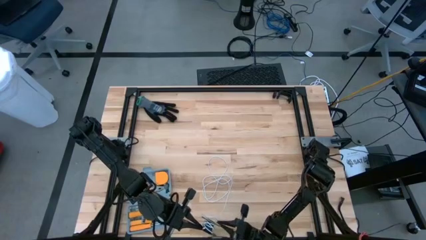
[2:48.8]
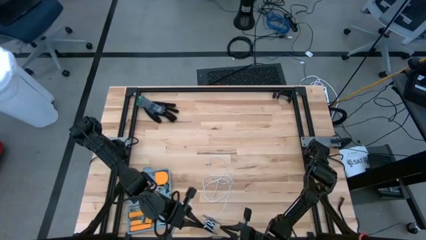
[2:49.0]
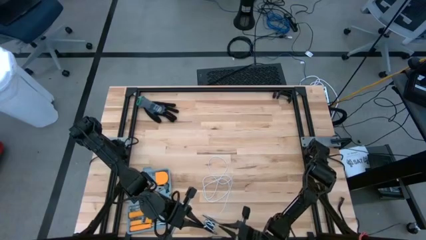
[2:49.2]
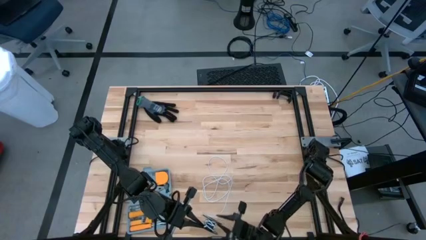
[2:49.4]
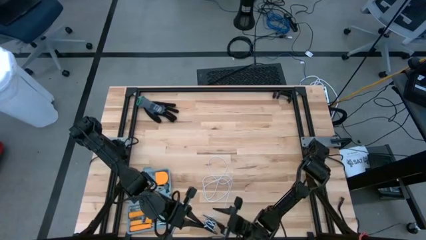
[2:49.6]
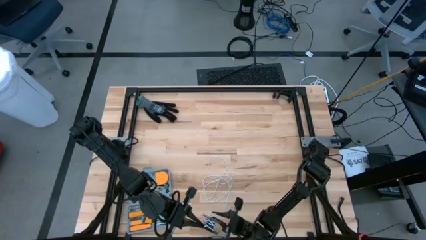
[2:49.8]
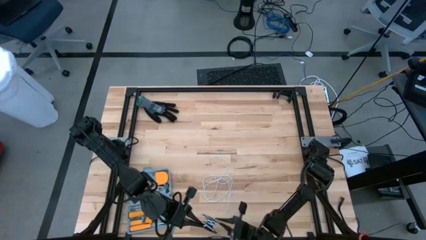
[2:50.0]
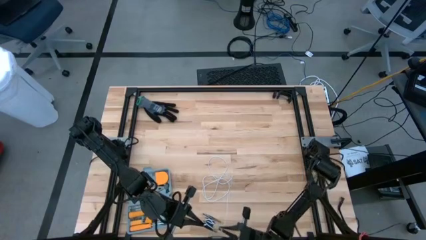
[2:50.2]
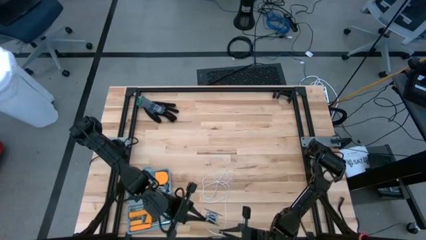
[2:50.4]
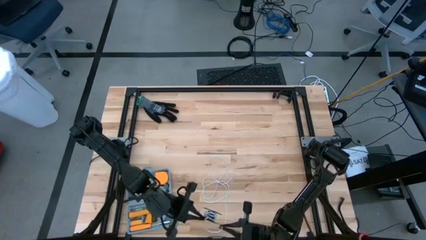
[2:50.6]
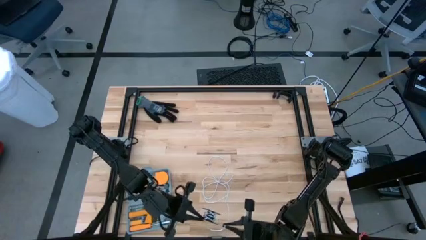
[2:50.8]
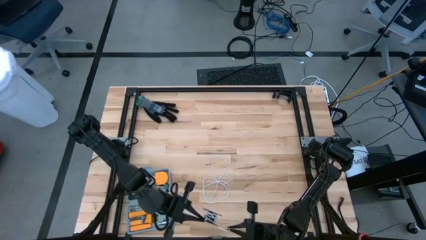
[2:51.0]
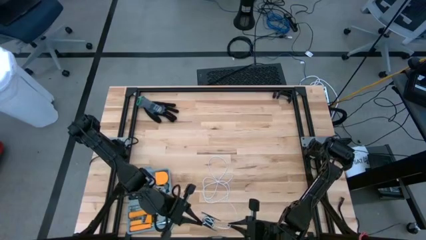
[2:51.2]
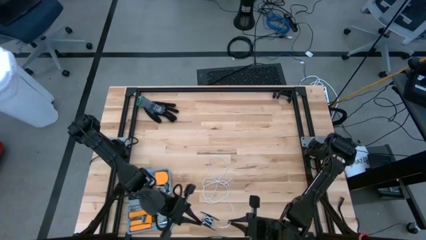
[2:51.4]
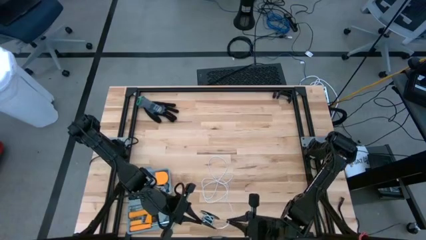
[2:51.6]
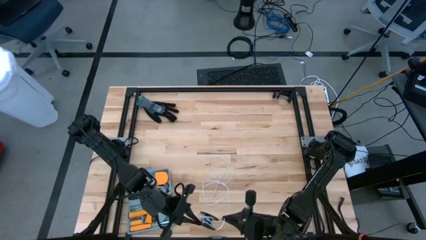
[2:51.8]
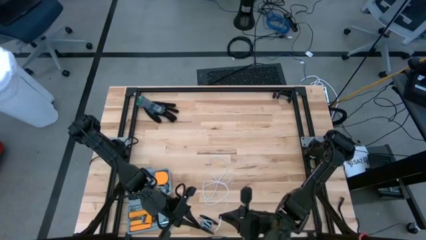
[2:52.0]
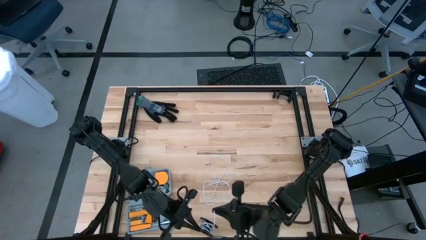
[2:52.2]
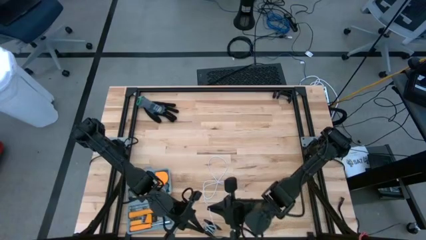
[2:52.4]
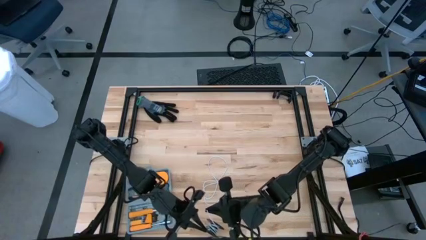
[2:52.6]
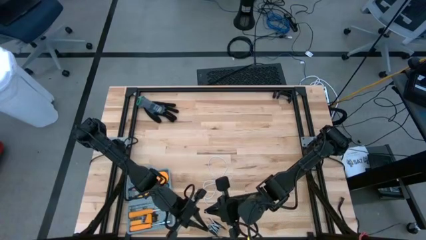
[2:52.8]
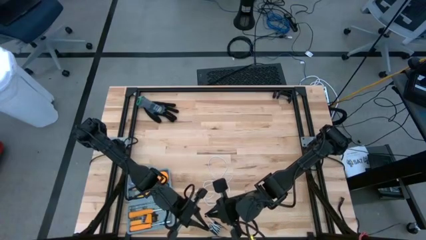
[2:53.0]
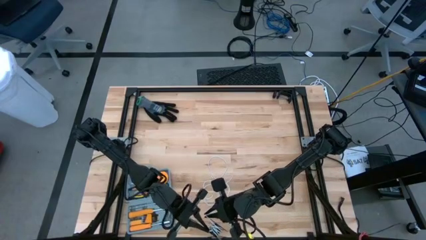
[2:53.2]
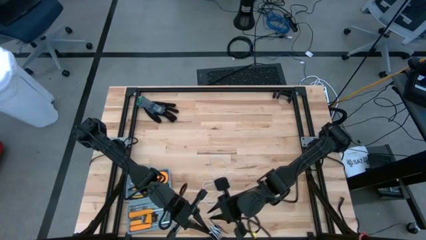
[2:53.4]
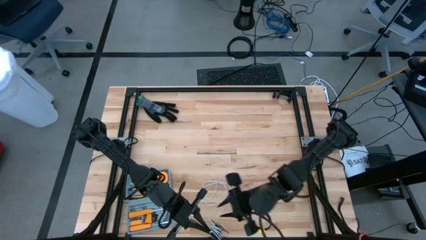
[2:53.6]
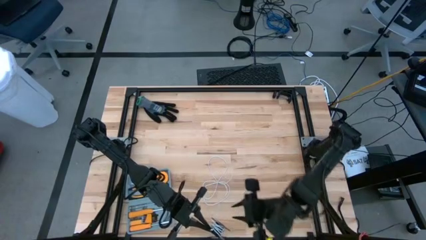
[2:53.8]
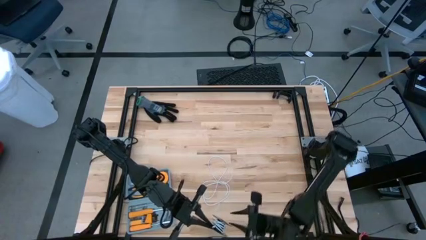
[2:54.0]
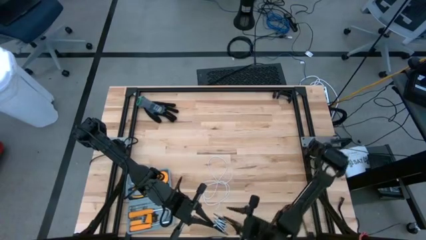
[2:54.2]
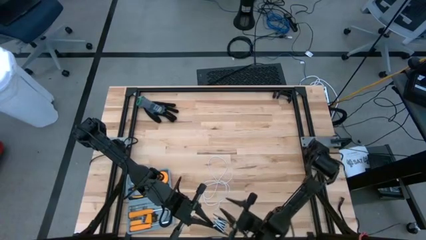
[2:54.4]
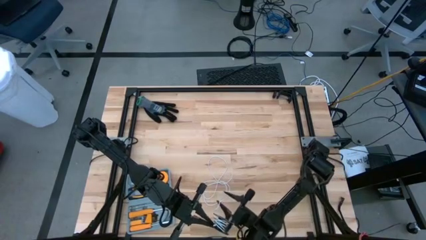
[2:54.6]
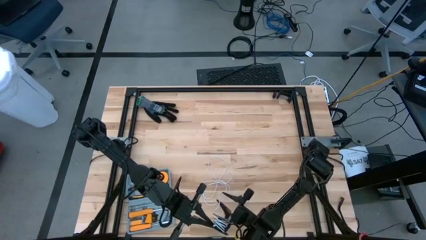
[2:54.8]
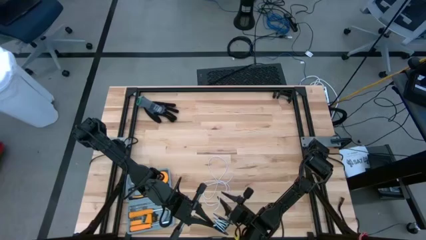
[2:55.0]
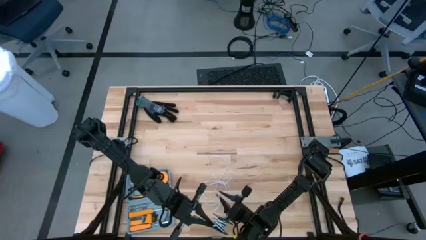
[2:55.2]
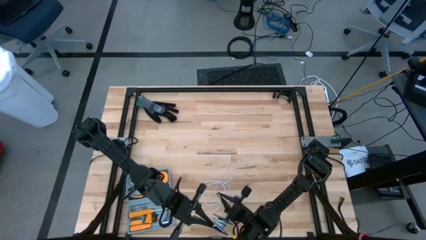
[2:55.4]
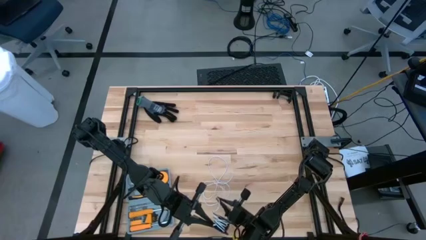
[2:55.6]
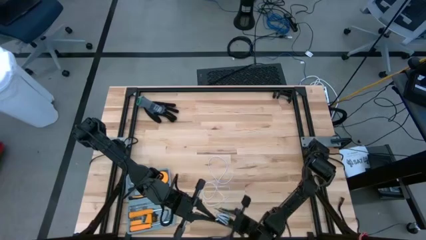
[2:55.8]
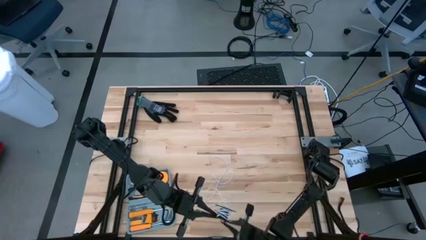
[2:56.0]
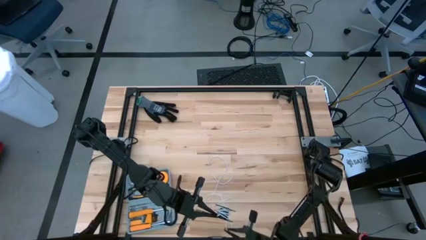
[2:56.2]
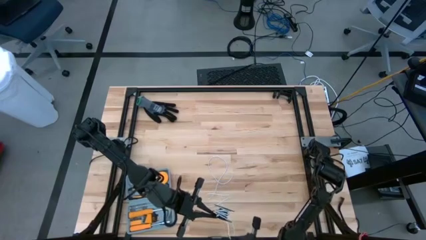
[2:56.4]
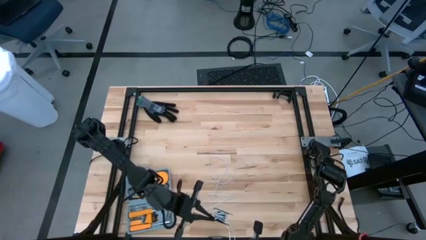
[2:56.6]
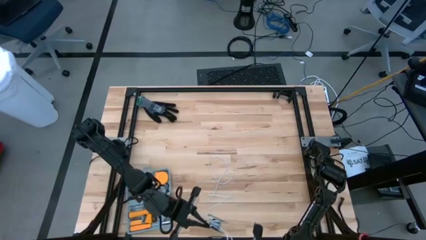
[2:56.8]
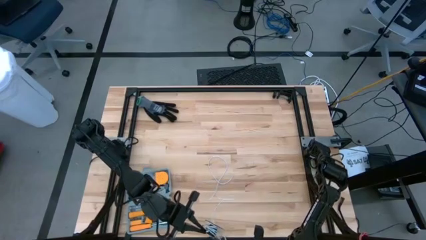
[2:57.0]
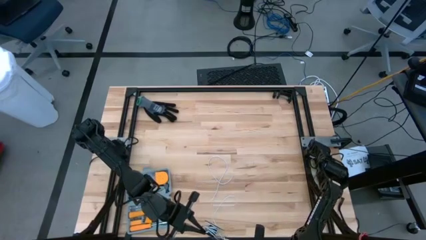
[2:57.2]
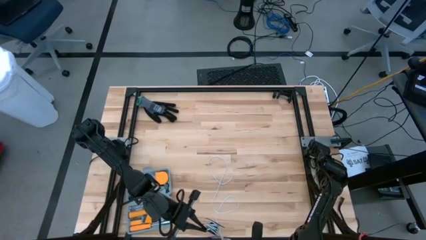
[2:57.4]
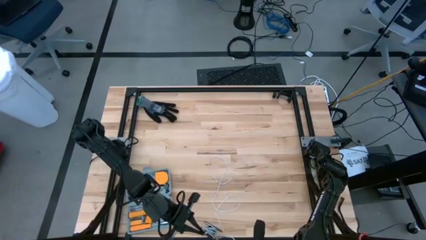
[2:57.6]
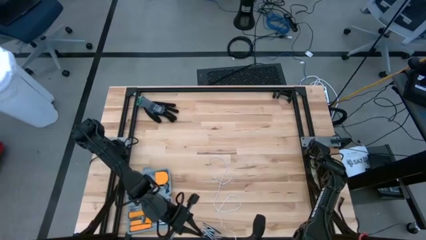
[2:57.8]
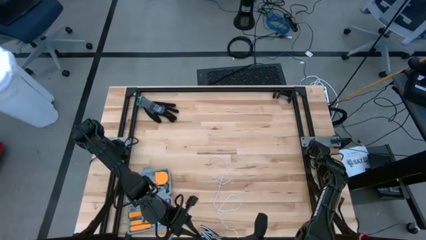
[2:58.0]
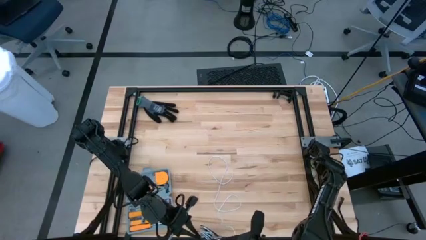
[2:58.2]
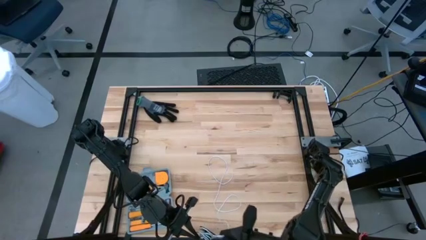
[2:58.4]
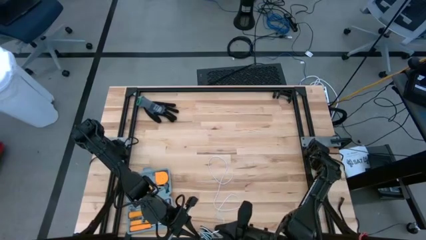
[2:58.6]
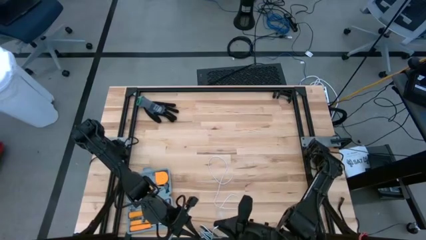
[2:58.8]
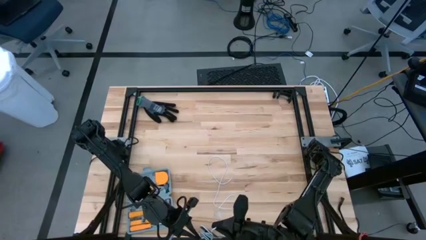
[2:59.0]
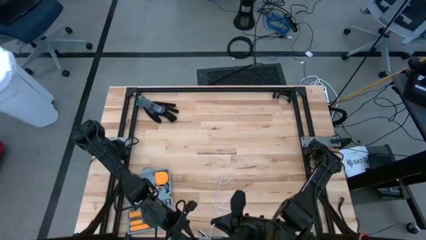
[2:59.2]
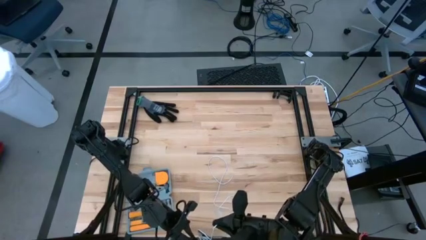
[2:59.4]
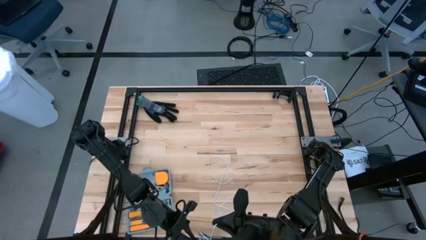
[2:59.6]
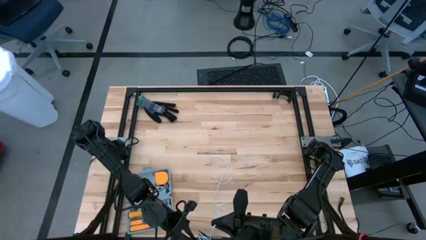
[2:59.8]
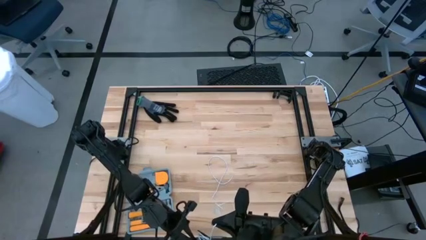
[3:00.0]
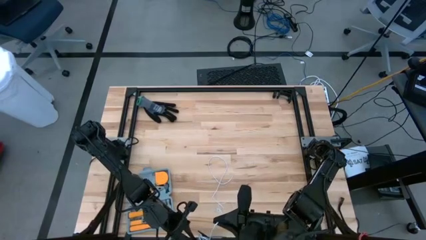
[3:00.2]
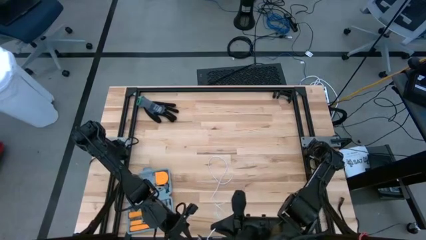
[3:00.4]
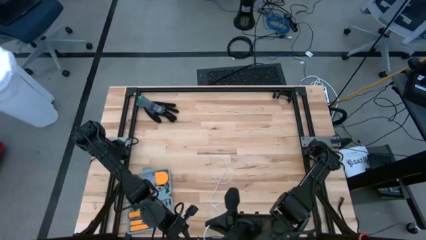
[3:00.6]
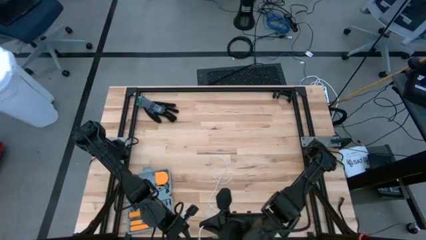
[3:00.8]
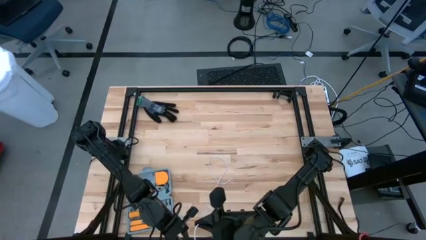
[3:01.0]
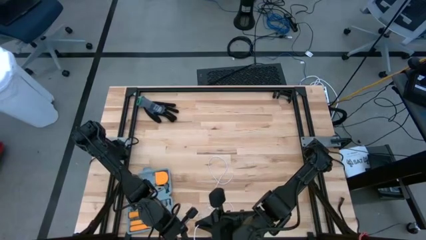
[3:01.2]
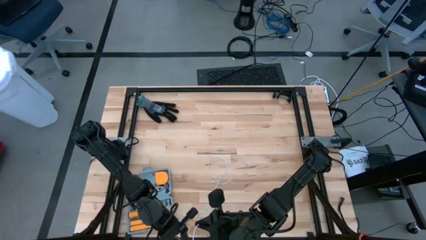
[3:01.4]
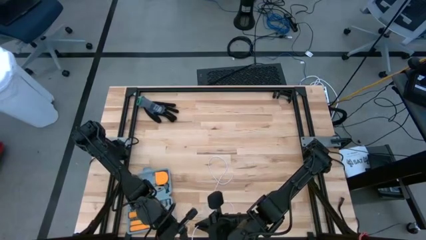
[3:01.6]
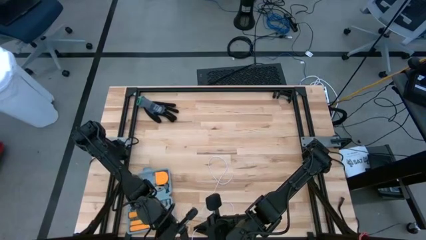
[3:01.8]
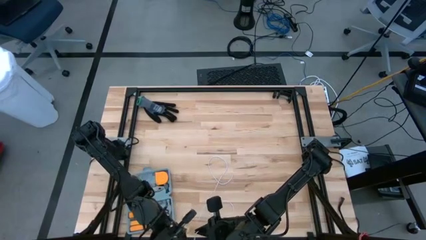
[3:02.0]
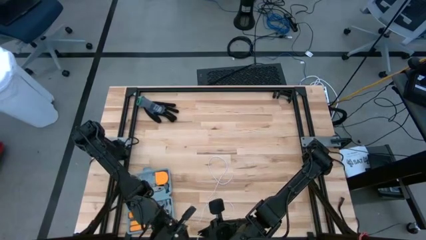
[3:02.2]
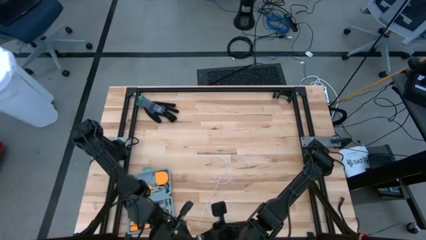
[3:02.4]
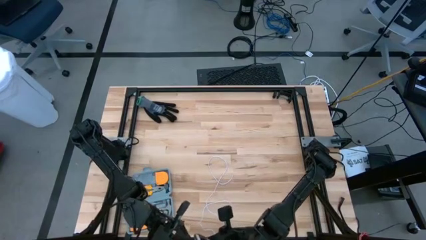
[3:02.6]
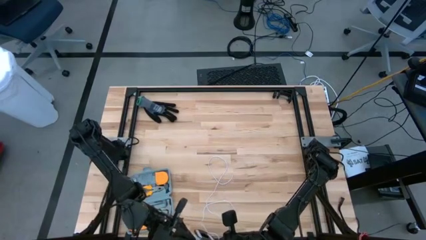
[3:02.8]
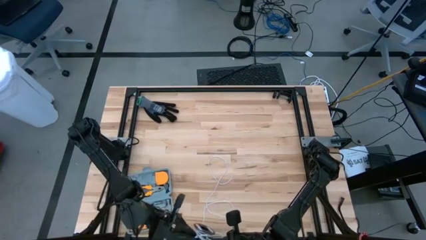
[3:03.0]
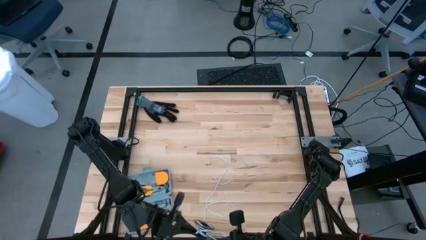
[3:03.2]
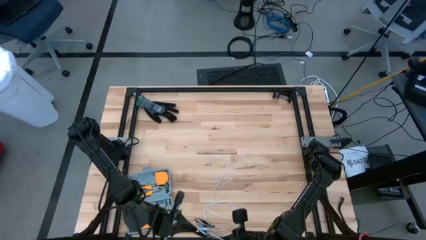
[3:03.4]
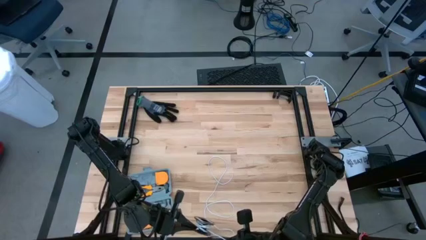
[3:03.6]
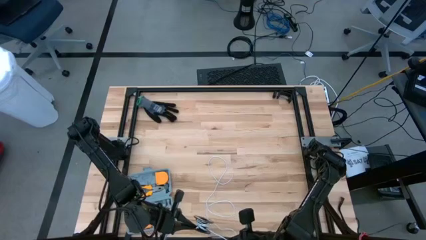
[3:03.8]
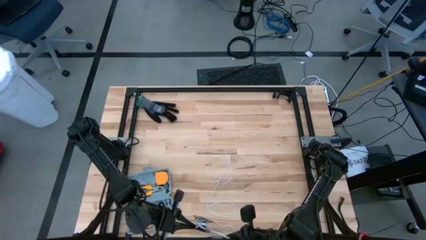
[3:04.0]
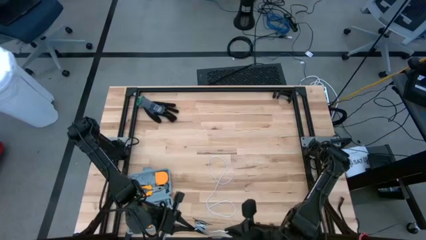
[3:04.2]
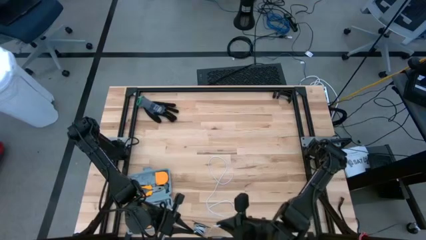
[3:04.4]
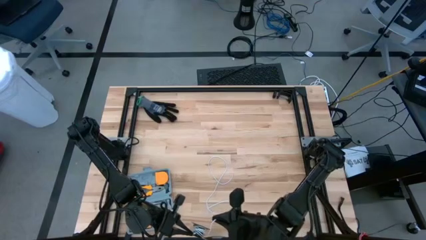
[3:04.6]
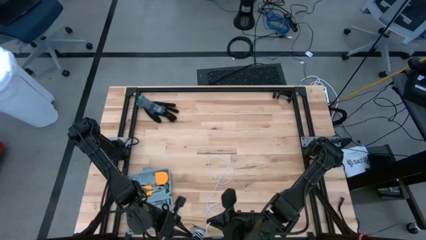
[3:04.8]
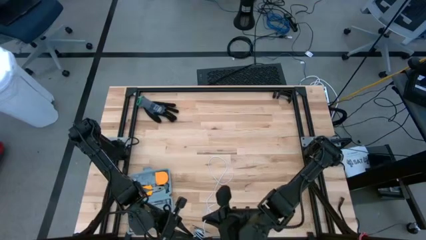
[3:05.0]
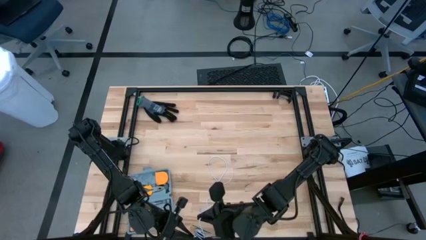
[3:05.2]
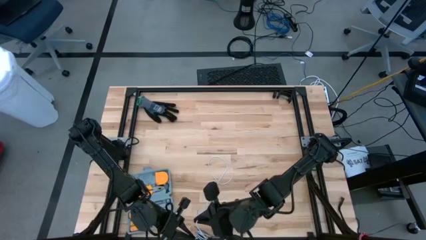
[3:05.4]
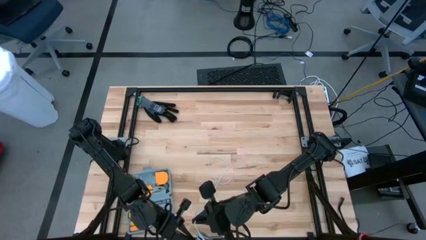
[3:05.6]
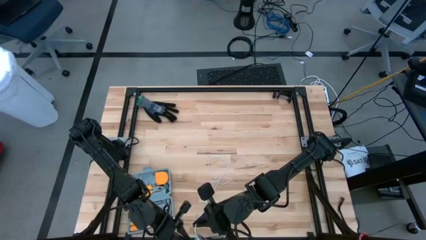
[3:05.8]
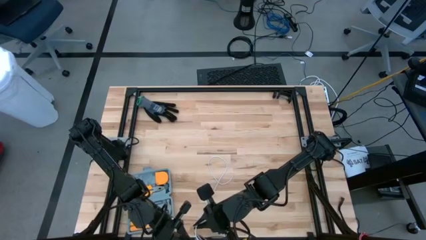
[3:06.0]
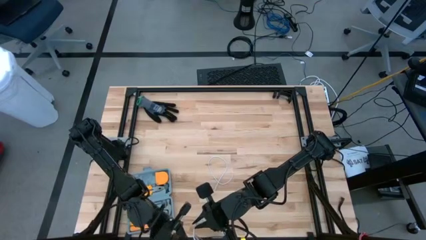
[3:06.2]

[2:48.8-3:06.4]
Task: Coil cords
Coil the white cable wire into the spool
